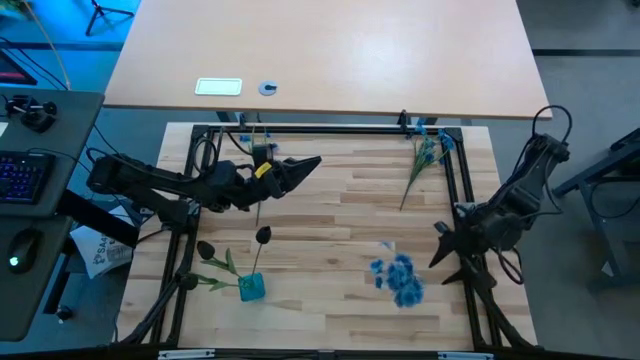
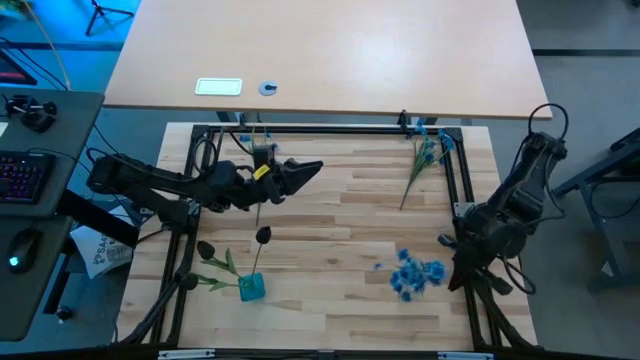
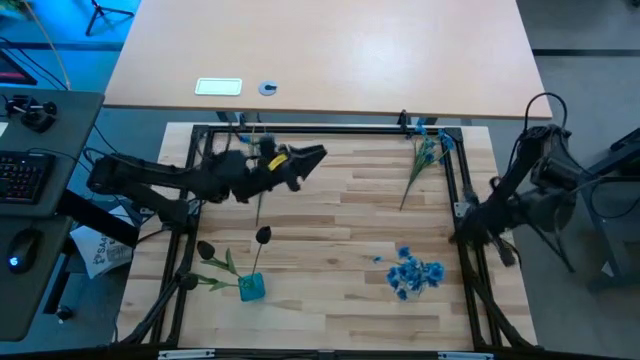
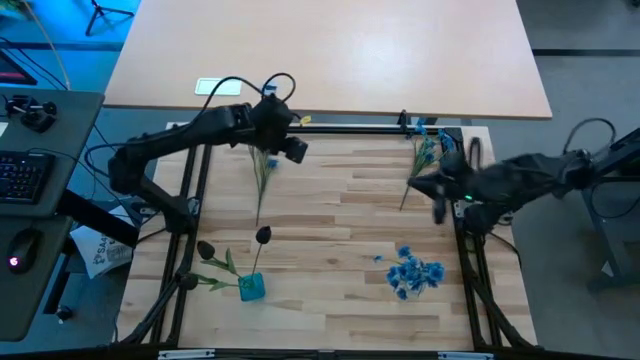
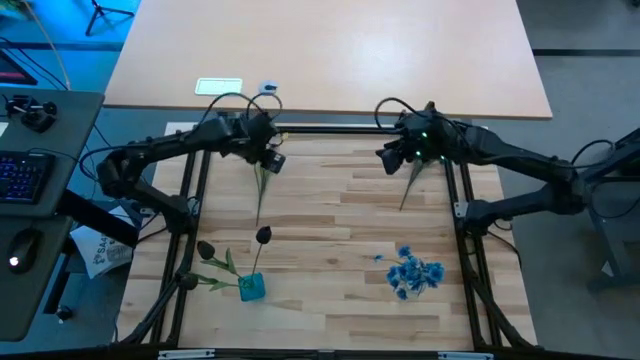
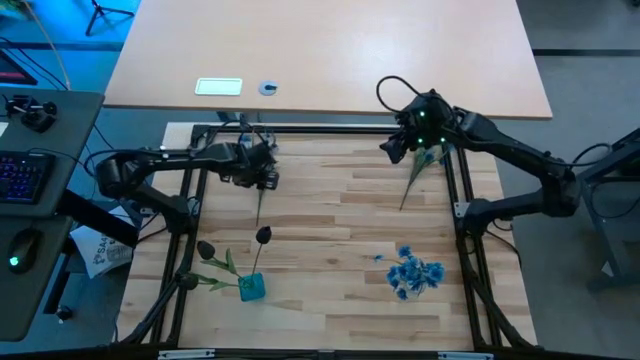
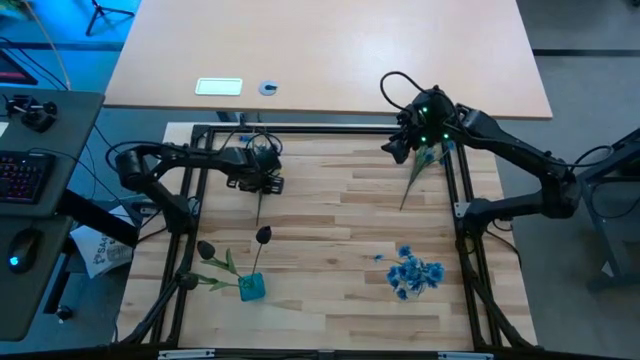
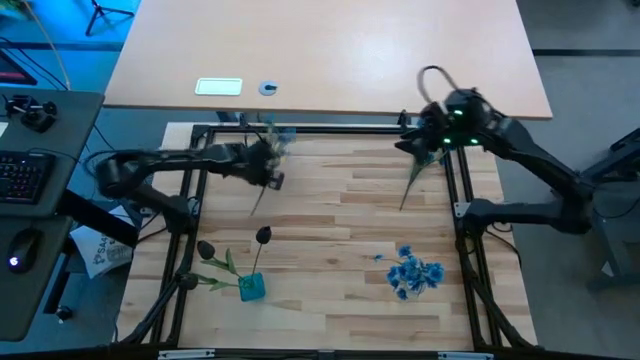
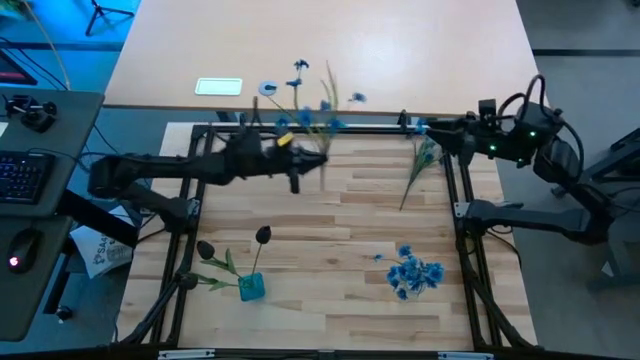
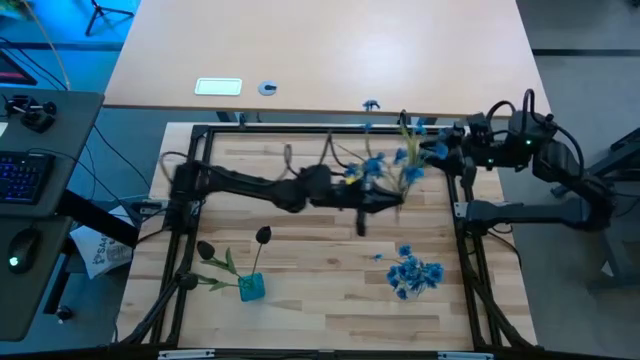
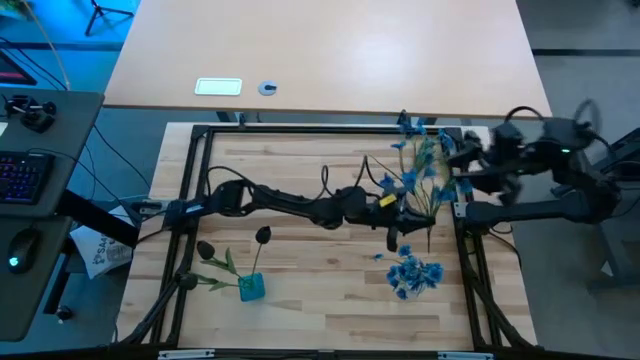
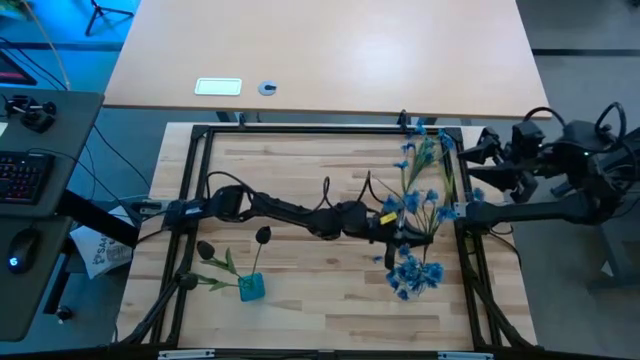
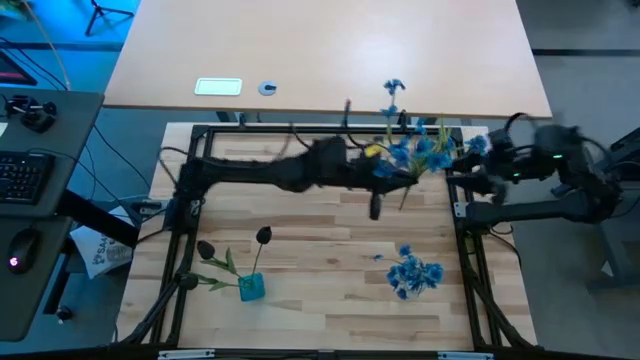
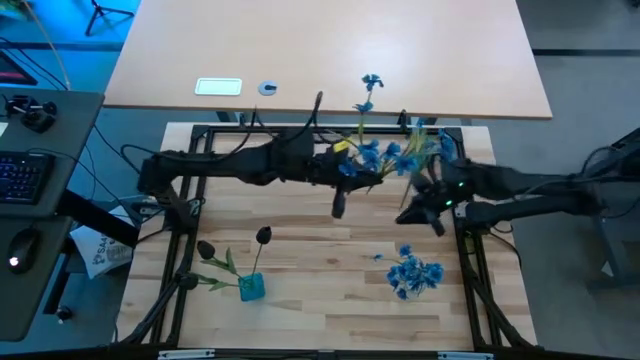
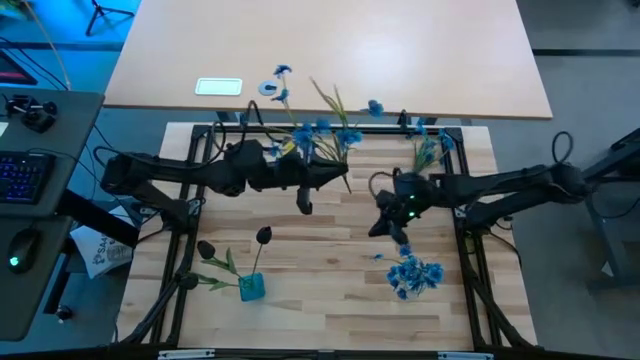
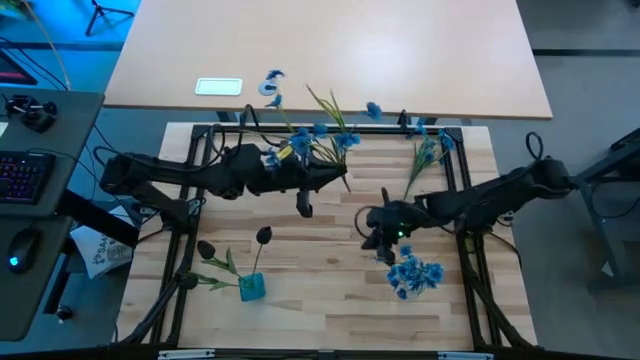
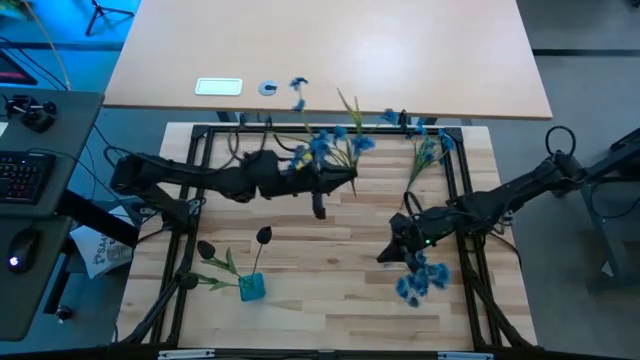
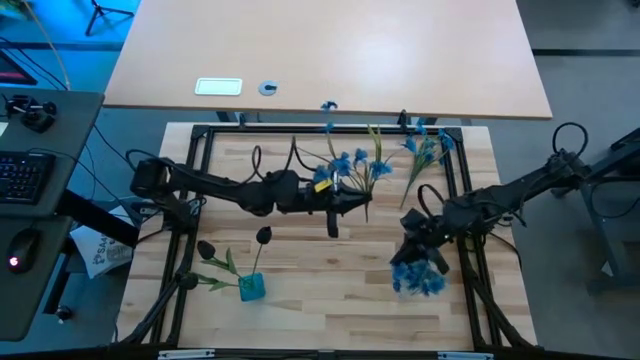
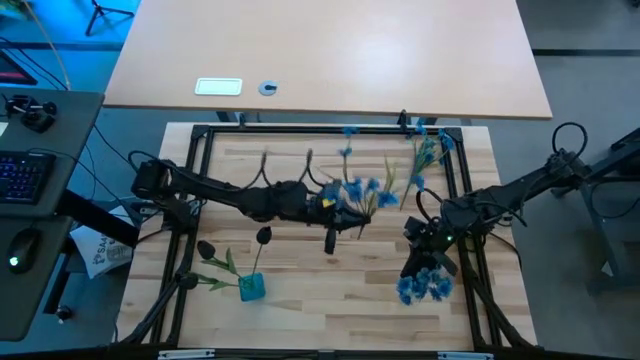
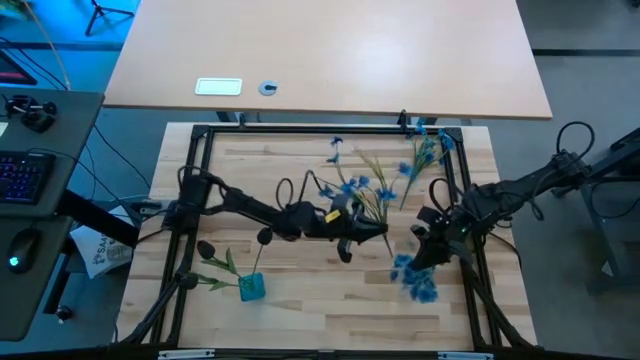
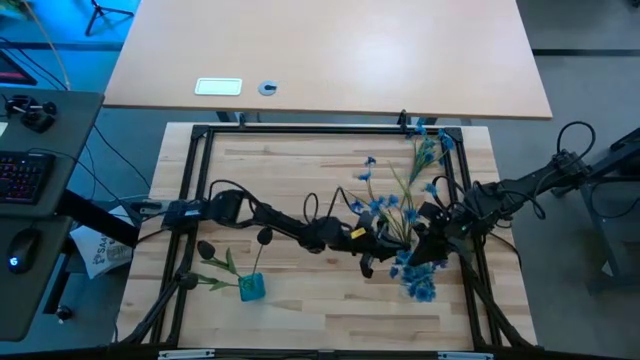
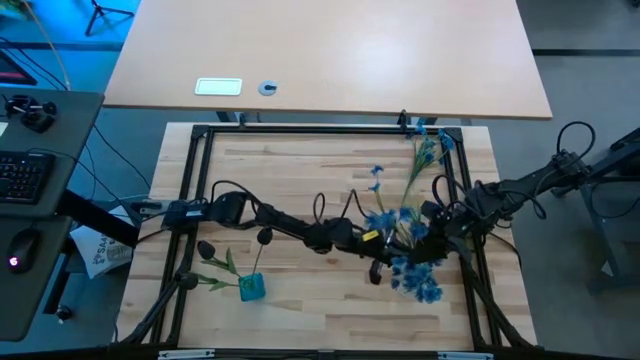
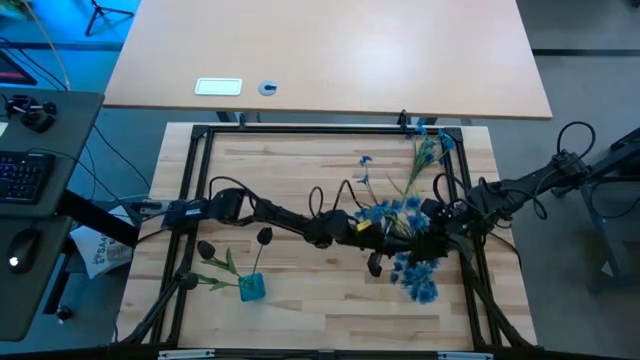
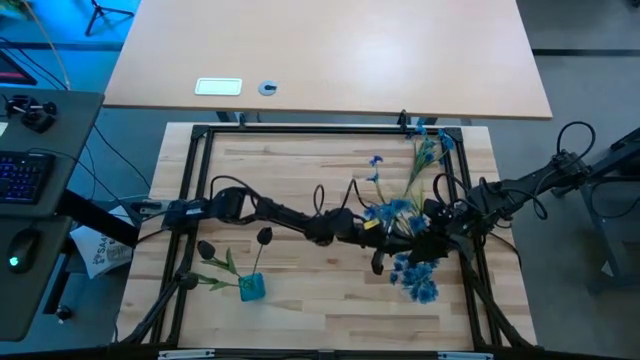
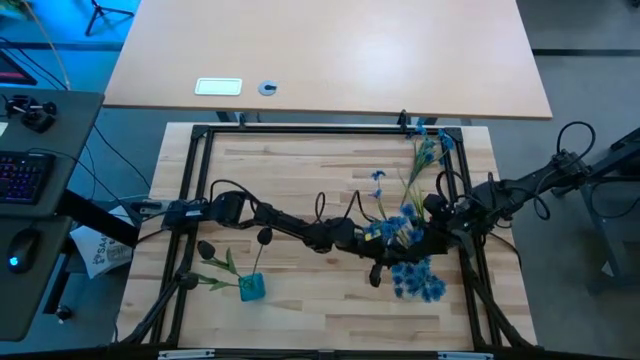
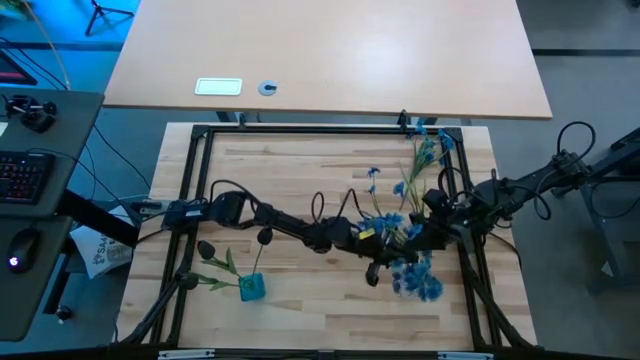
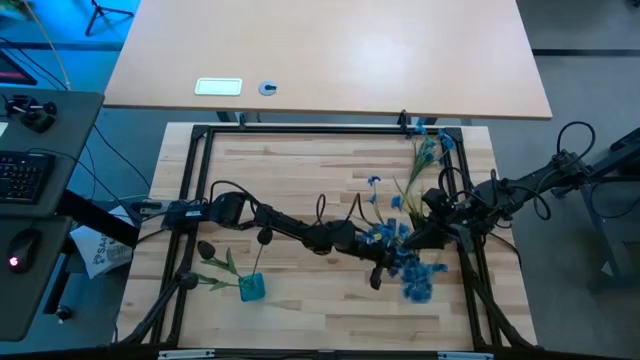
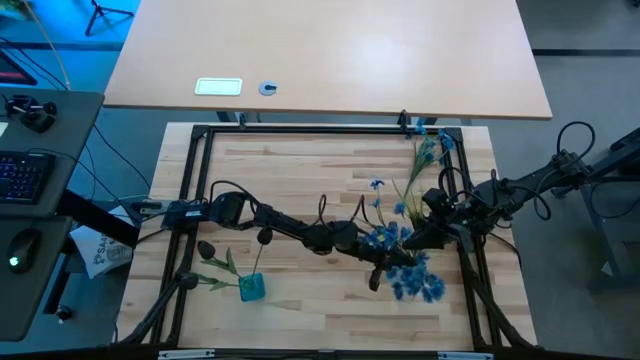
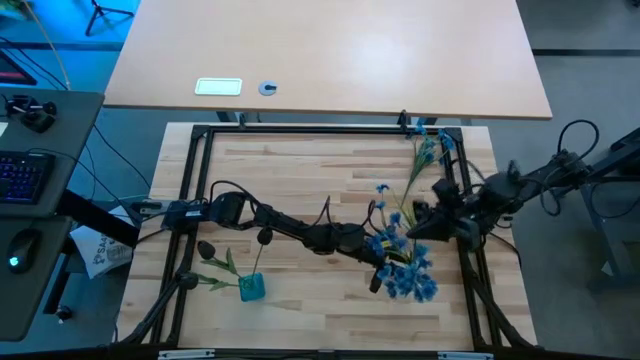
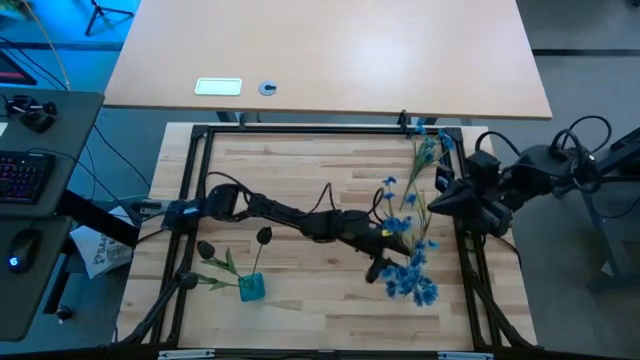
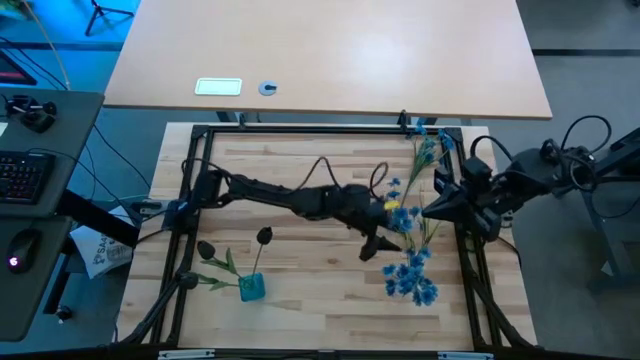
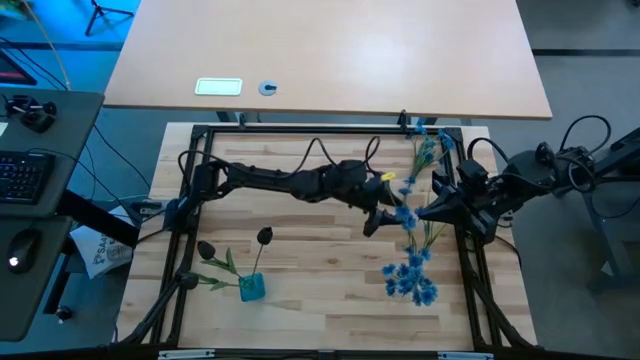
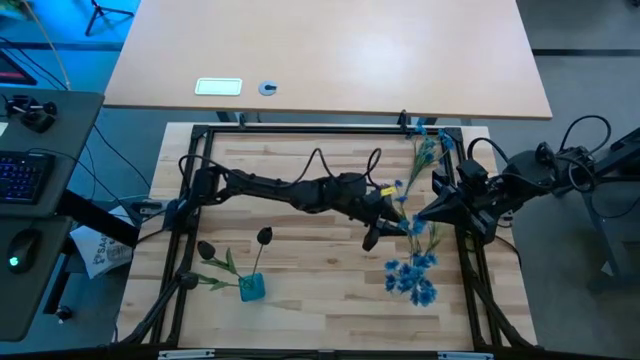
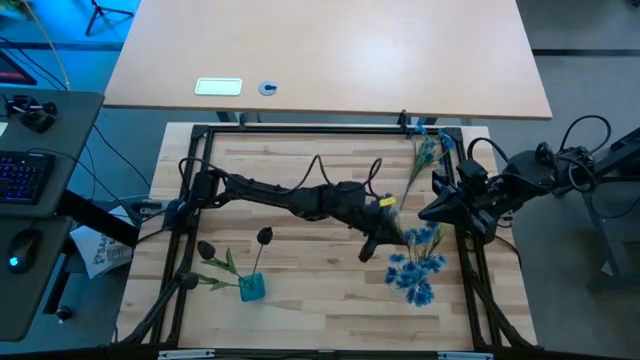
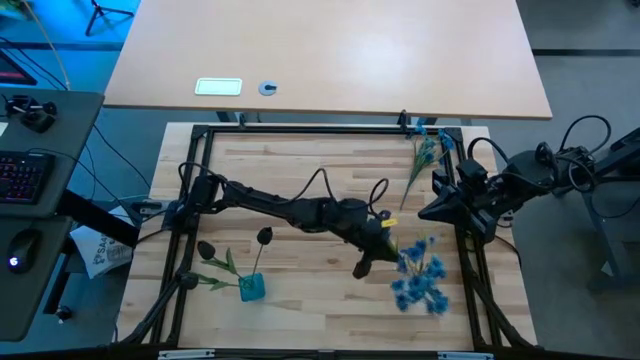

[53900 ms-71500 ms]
Task: Sort flowers into vase by color
Put the left blue flowers into the transparent vase

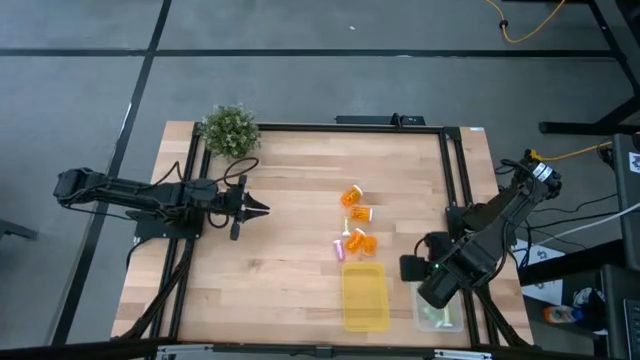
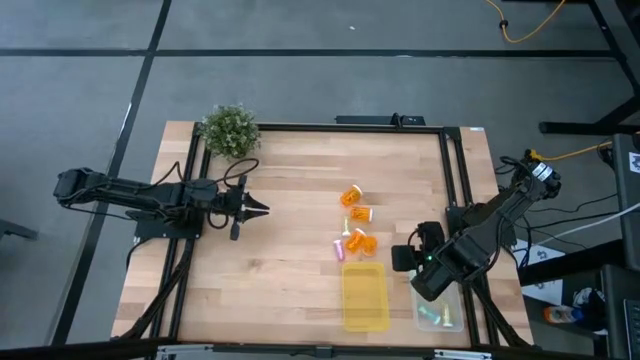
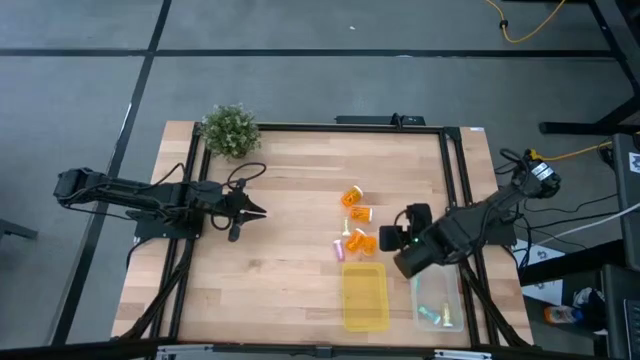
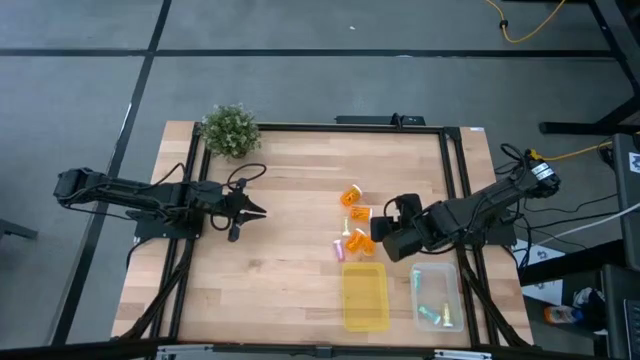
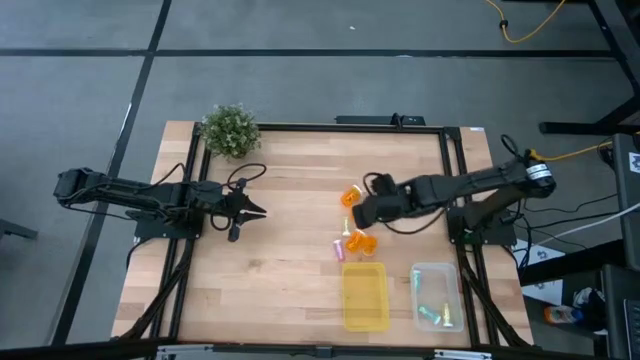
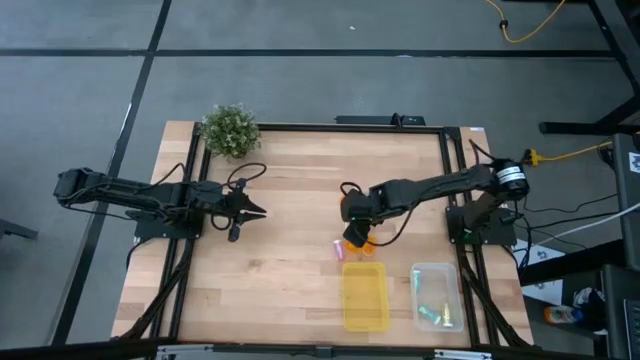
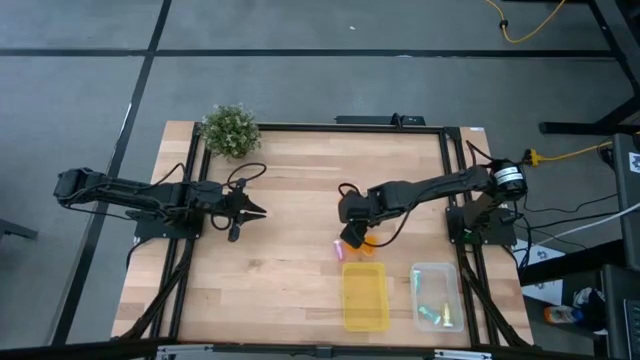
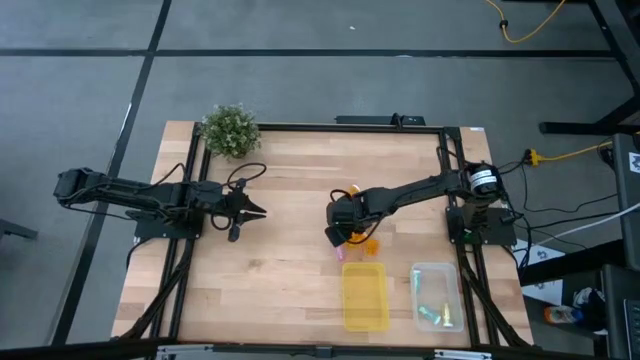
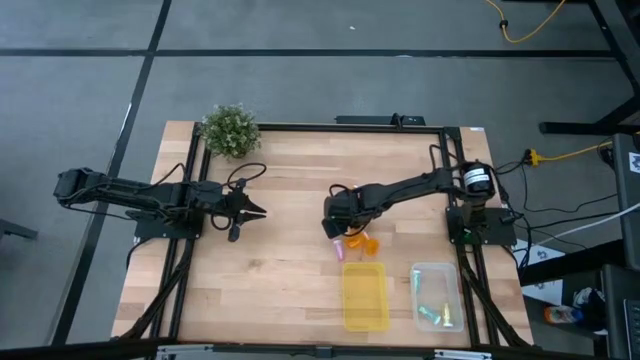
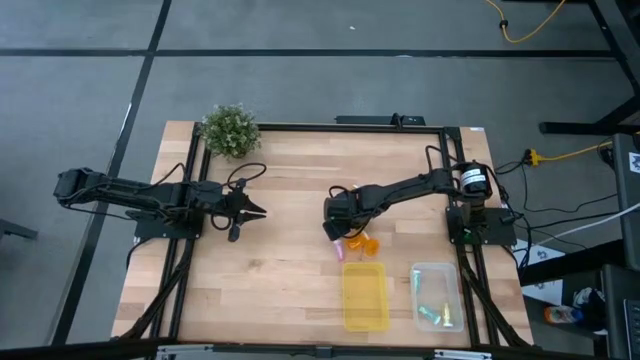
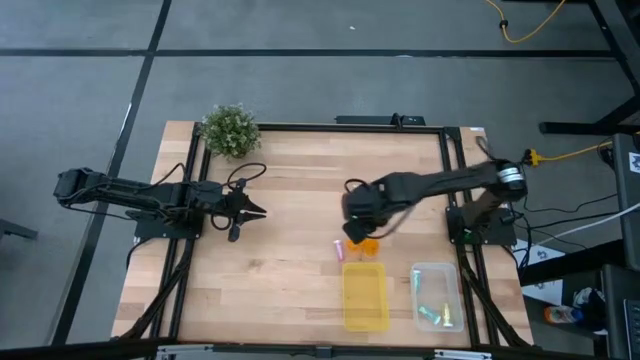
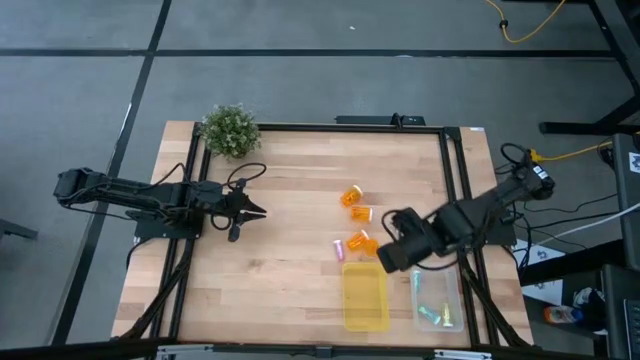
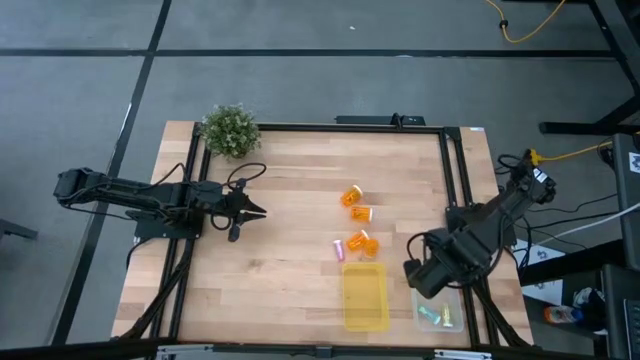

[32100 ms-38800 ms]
Task: Pick and place medicine bottles into bin by pill shape (circle, oval)
Put the yellow tablet bottle into the transparent bin
